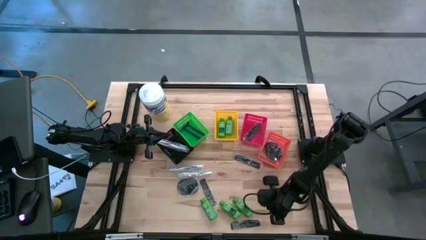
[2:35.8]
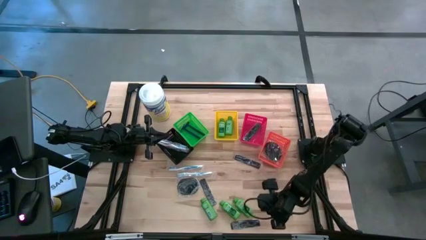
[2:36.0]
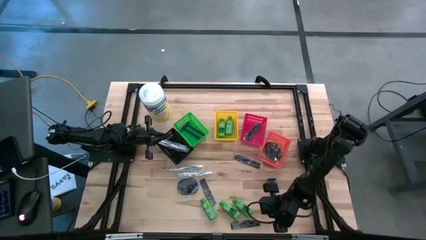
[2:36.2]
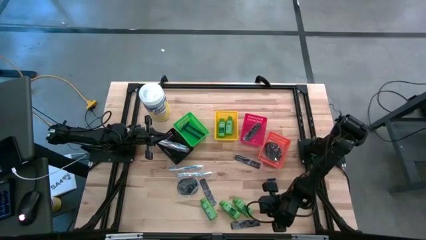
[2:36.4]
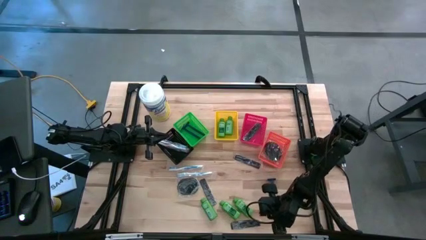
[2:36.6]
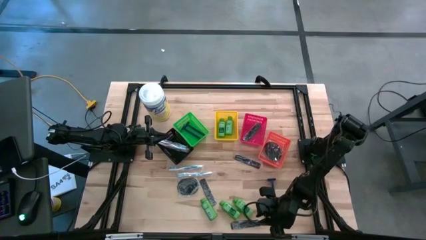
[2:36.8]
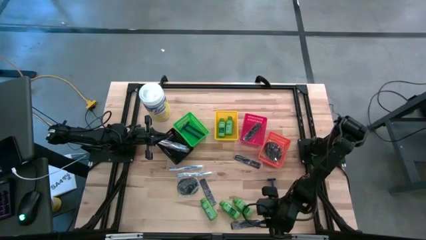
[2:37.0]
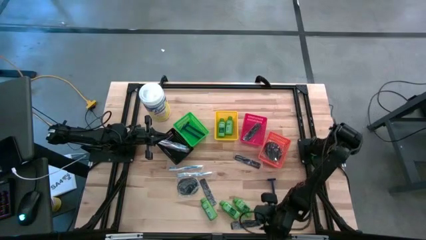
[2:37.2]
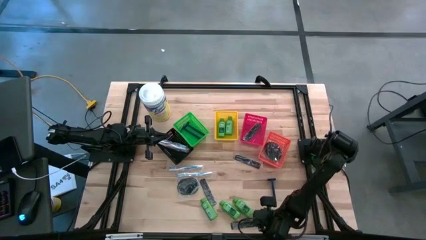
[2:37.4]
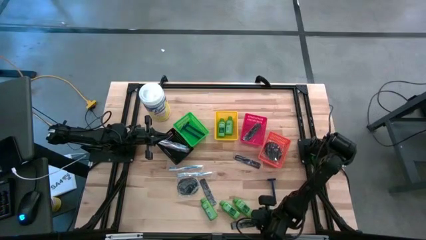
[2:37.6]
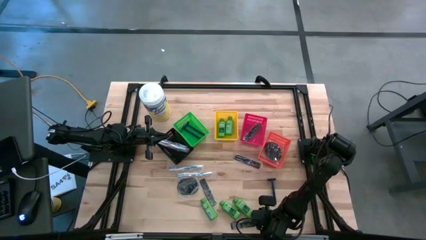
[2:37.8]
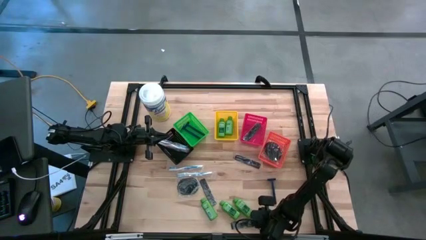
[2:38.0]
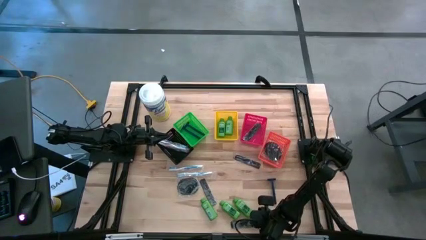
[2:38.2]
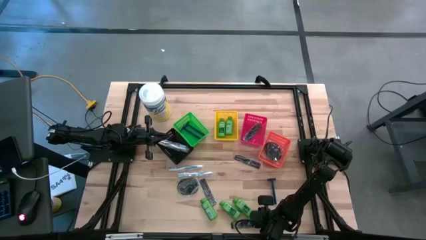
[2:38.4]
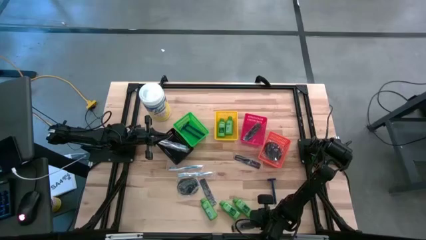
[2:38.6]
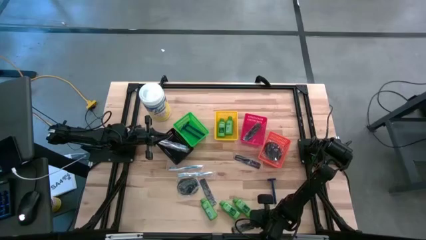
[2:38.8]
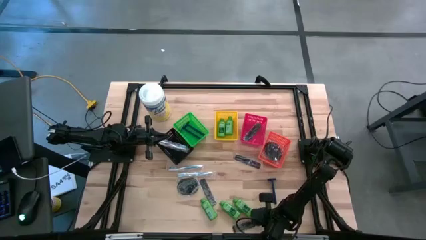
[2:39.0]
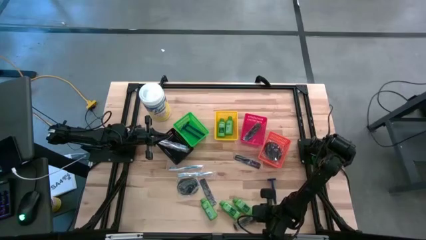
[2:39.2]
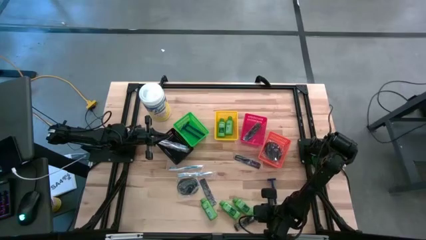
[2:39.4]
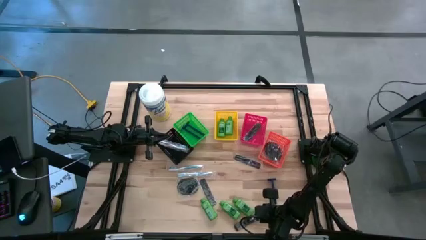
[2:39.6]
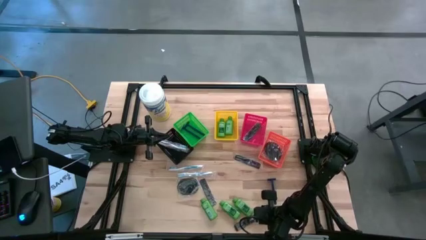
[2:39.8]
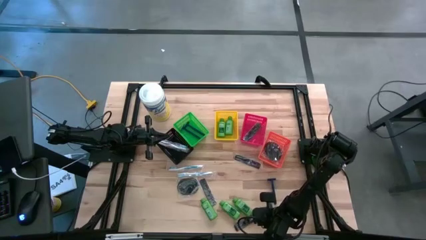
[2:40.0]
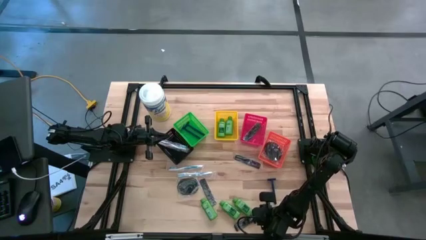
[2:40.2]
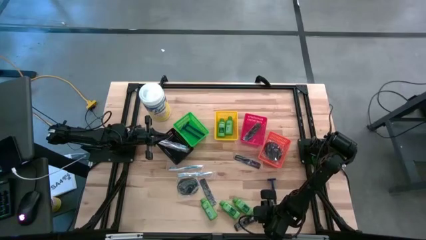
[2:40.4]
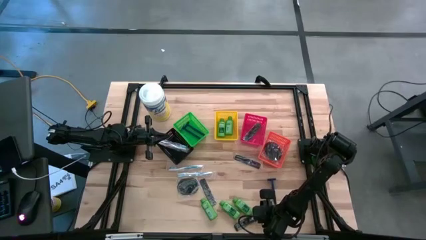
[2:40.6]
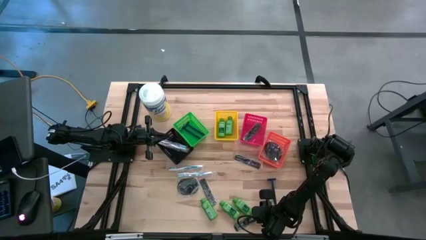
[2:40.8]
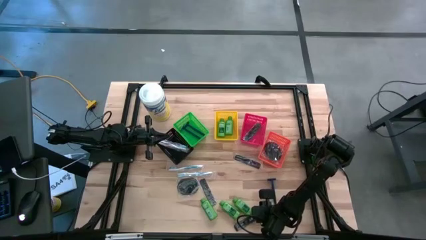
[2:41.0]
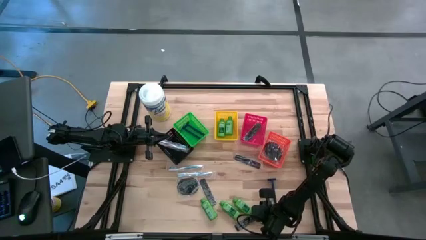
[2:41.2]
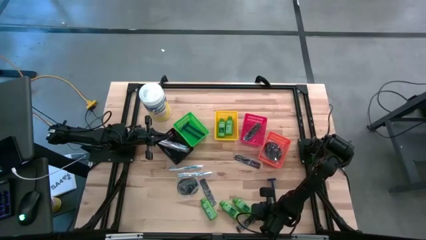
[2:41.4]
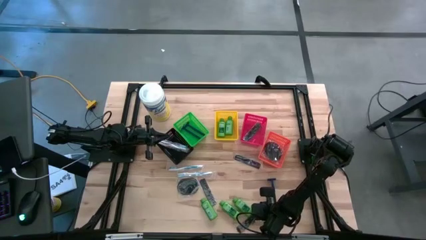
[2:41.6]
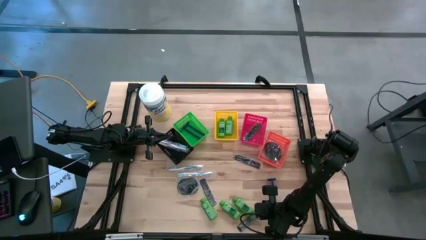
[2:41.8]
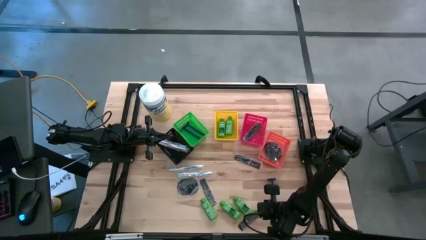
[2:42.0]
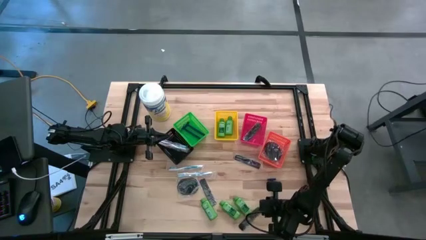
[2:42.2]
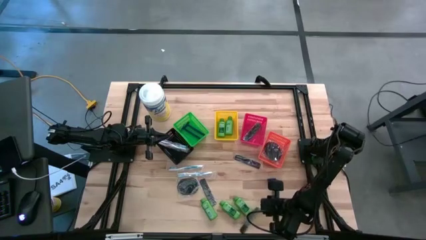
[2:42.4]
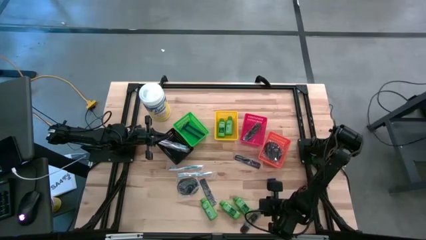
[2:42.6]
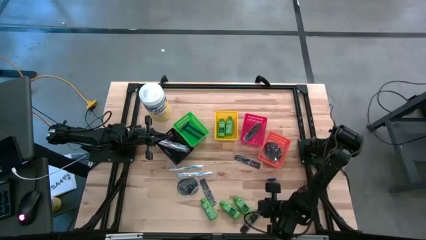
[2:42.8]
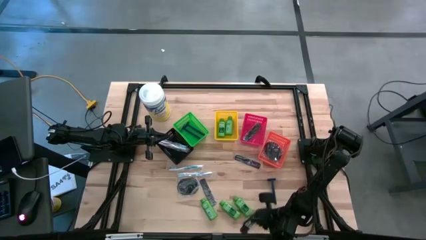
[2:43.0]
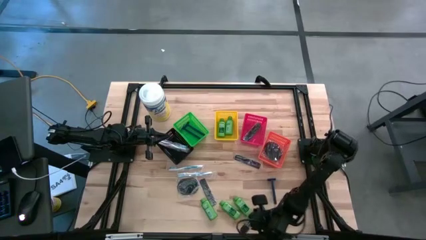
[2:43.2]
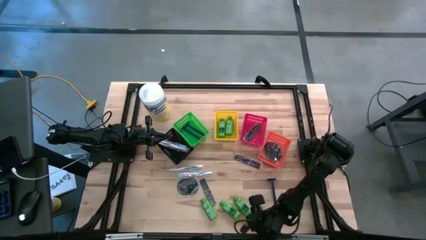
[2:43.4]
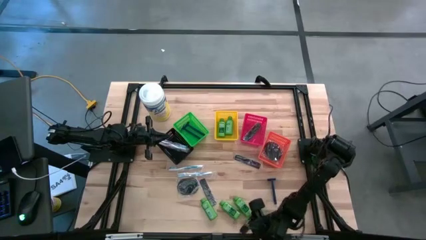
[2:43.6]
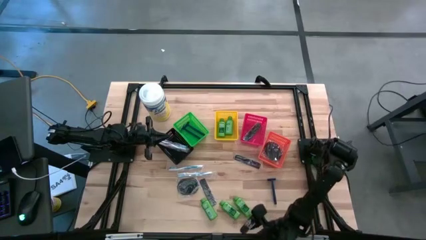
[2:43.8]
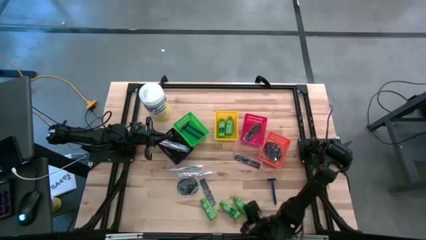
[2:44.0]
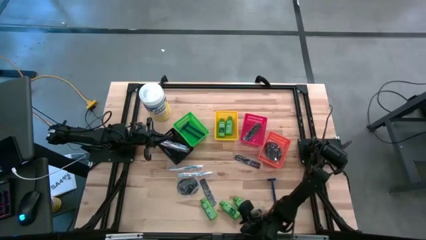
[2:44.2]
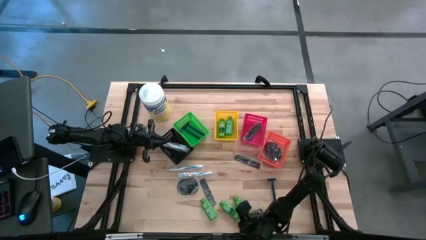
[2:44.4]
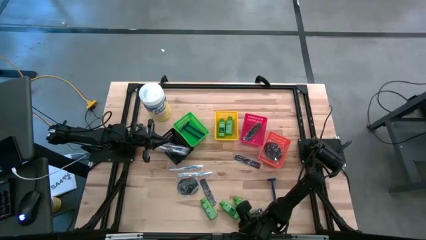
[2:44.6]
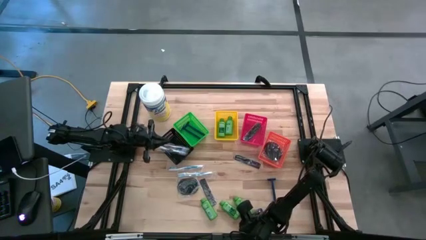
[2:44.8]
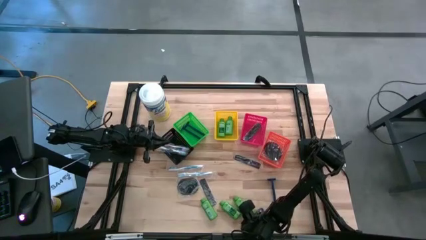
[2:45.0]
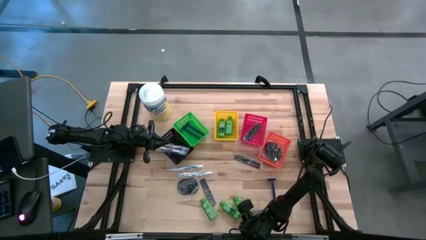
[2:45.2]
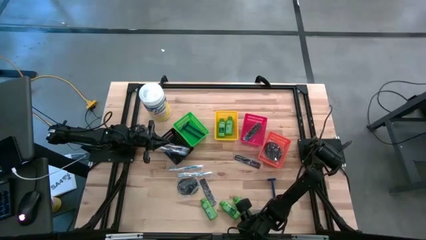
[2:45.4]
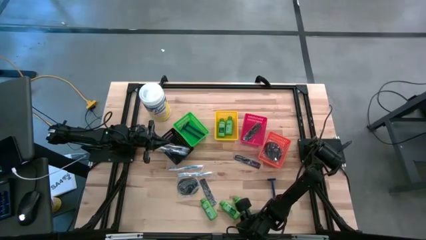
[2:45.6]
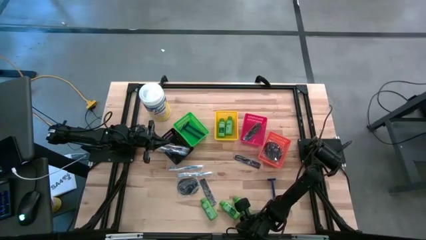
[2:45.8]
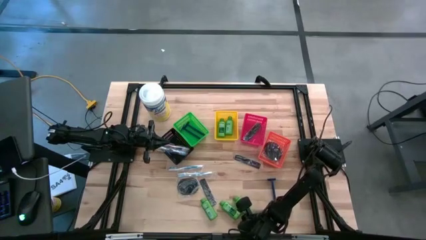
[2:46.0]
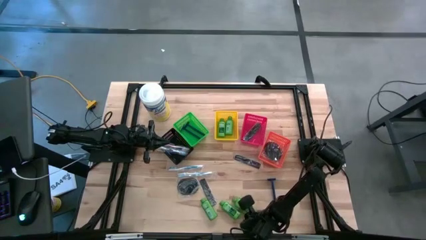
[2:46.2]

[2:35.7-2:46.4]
Task: Pick & Place Travel size toiletries
Put the bottom black hair comb into the red bin

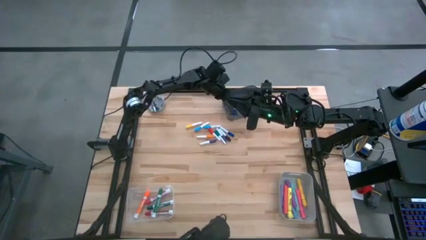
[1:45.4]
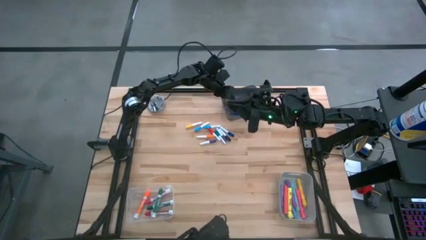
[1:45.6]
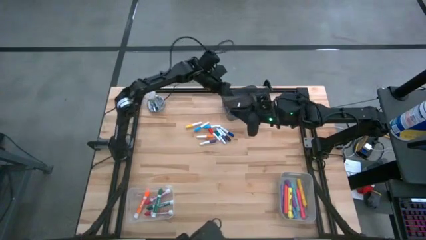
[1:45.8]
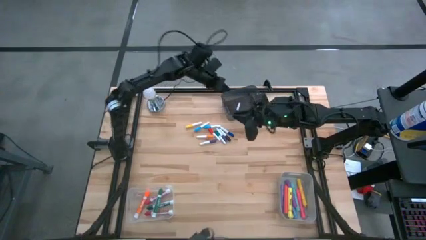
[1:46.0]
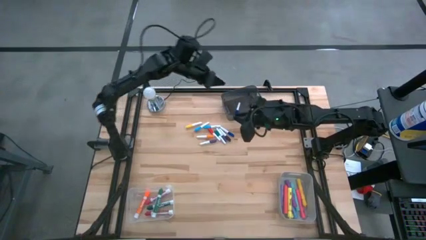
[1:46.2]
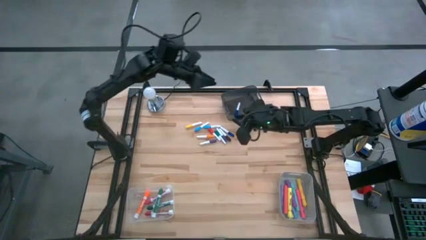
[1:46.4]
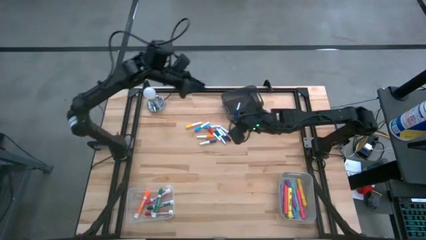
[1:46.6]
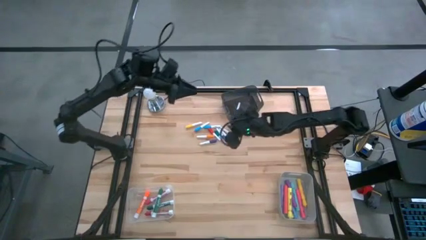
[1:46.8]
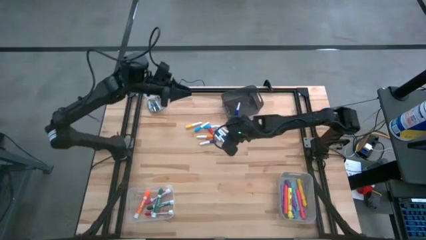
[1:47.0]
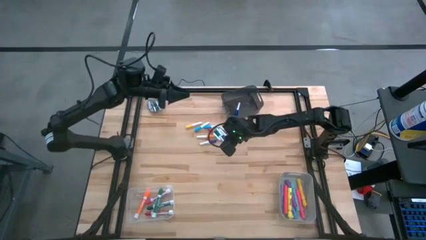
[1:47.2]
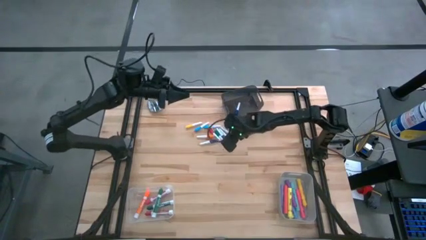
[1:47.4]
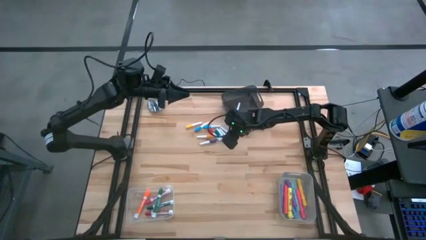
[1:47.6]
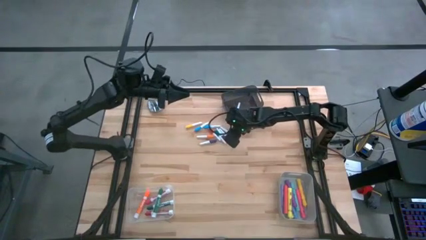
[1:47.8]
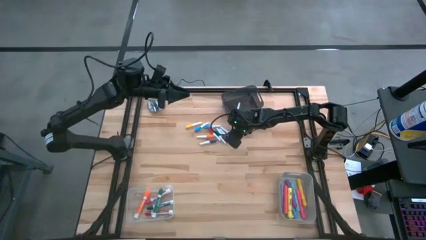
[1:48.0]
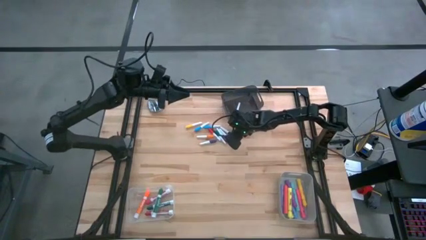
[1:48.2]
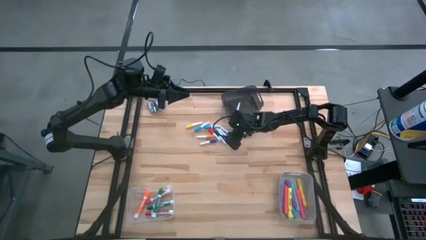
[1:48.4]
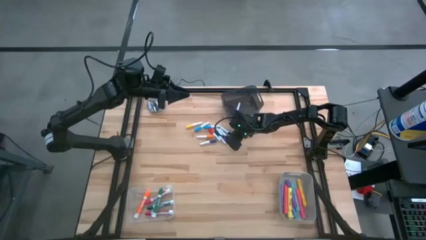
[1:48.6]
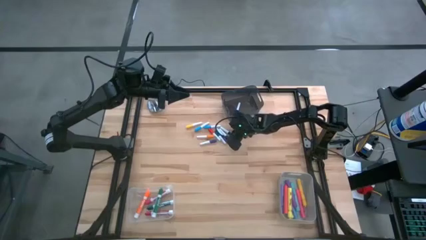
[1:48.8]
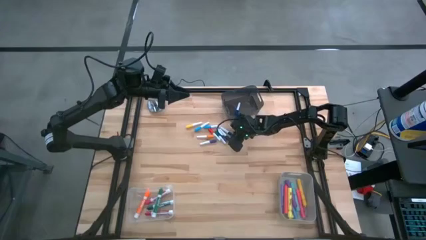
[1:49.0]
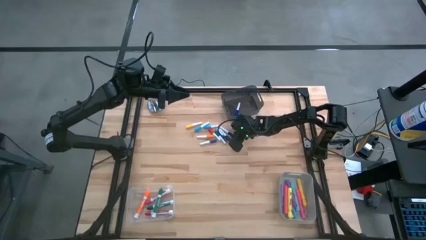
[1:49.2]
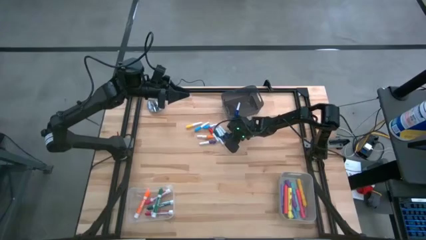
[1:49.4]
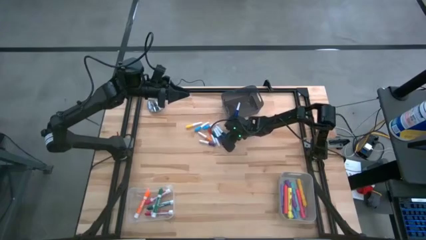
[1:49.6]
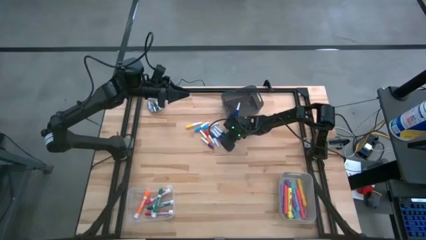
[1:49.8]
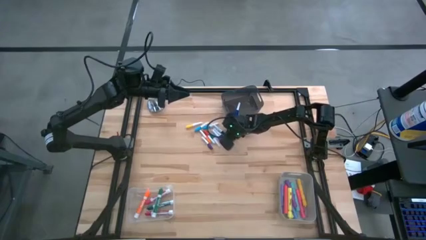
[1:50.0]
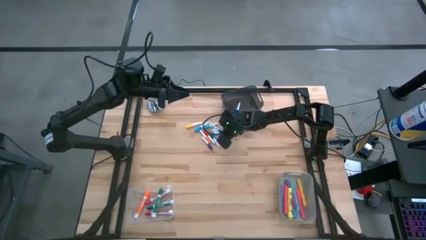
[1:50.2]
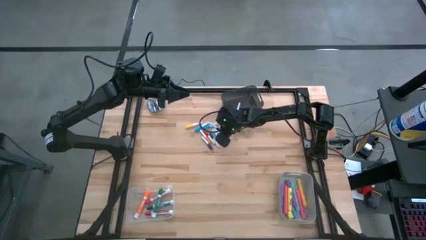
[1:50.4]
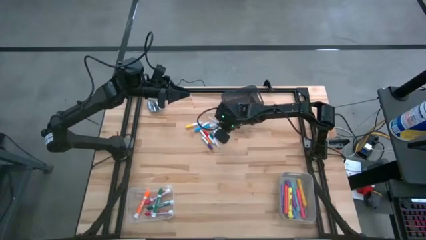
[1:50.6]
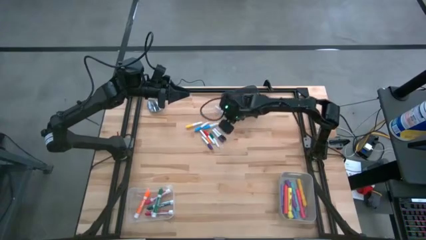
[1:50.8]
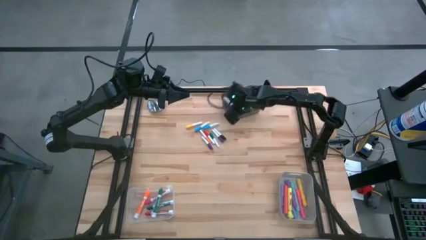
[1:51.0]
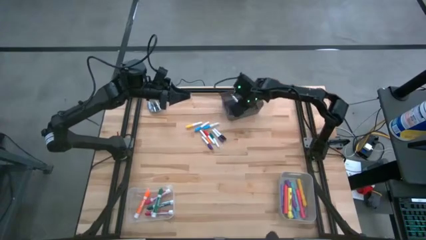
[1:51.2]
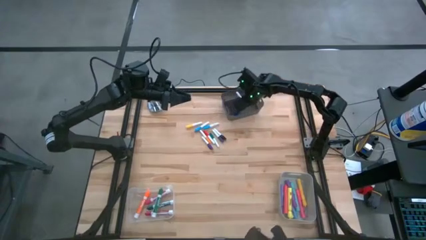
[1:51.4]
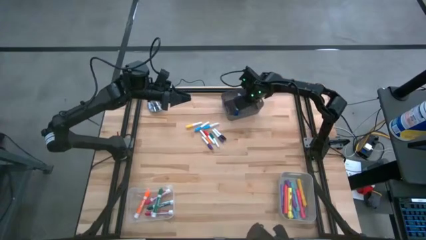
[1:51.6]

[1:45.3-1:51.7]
Task: Pick & Place Markers
Put the small dark blue highlighter pen into the black bin
